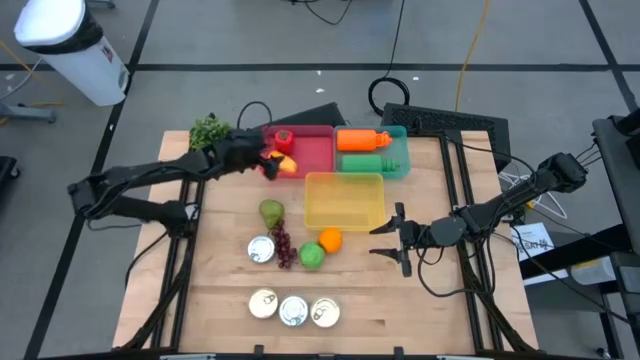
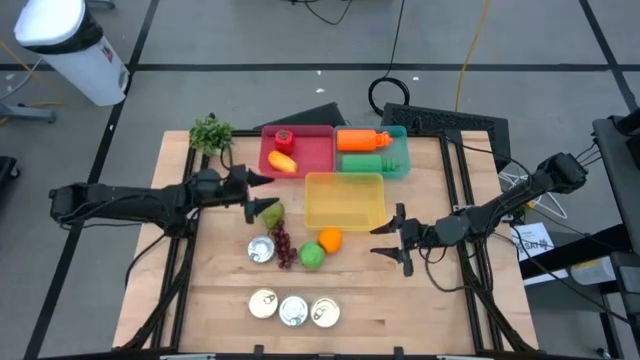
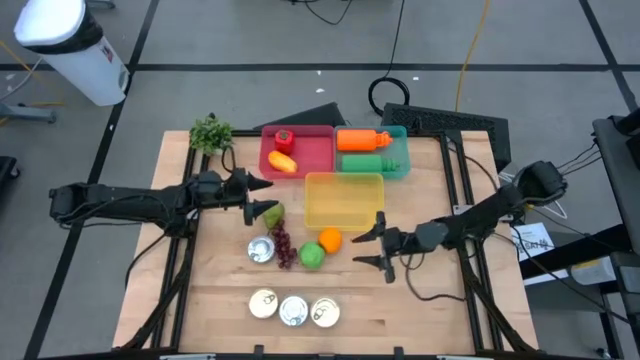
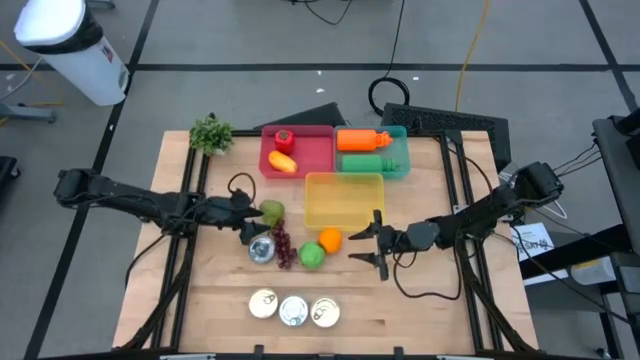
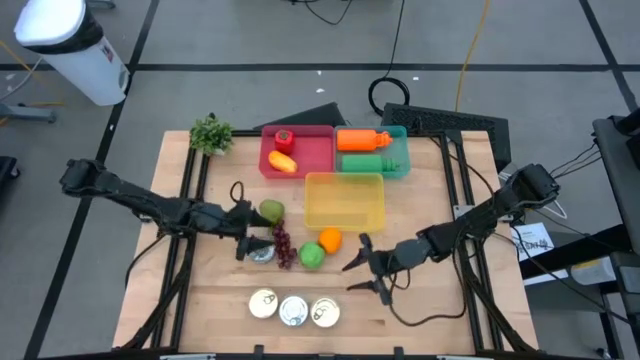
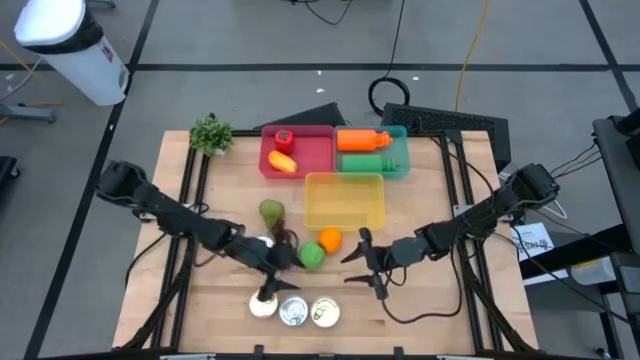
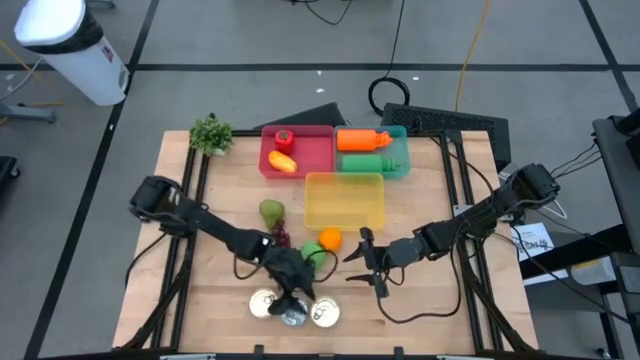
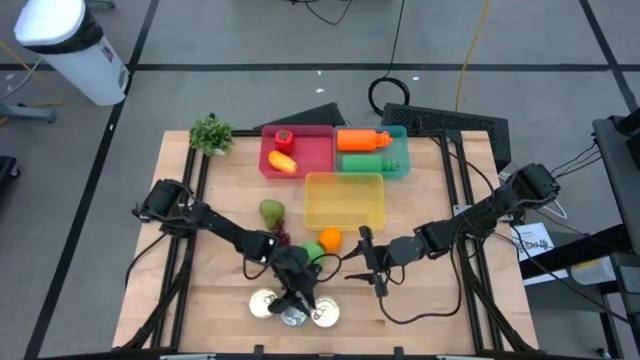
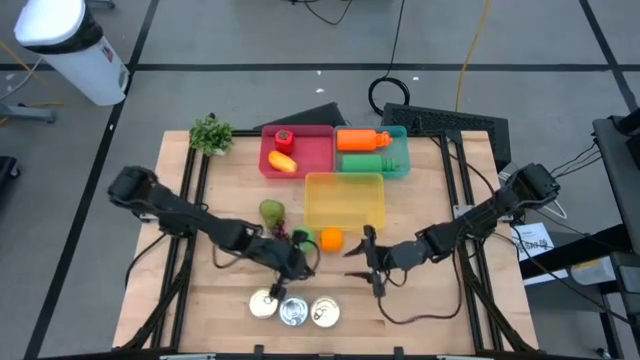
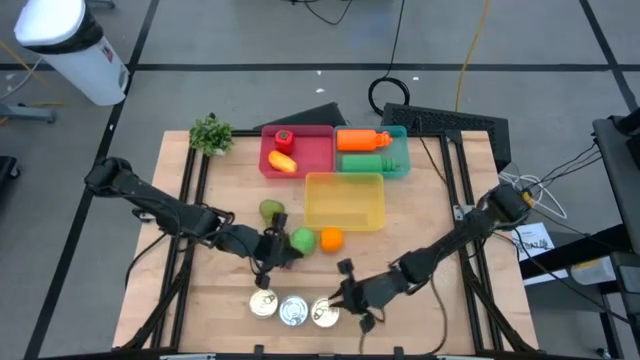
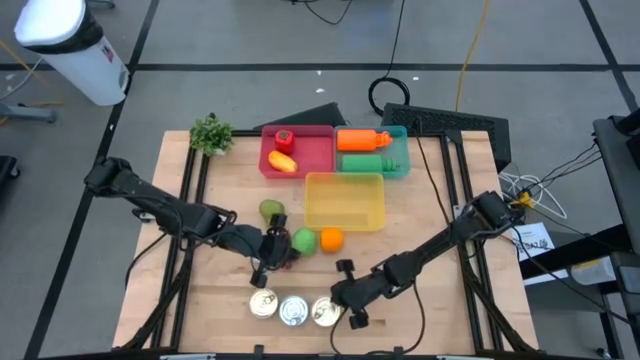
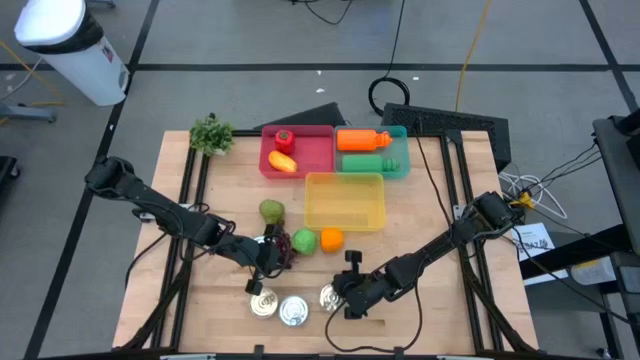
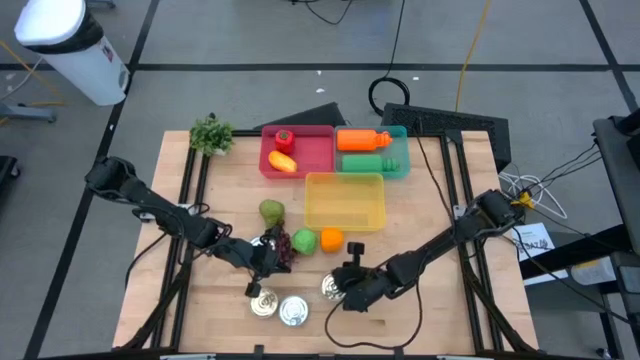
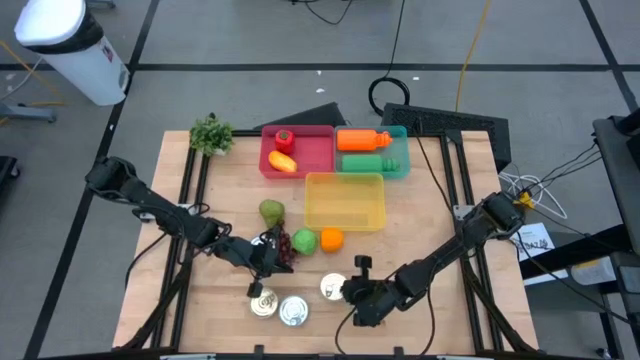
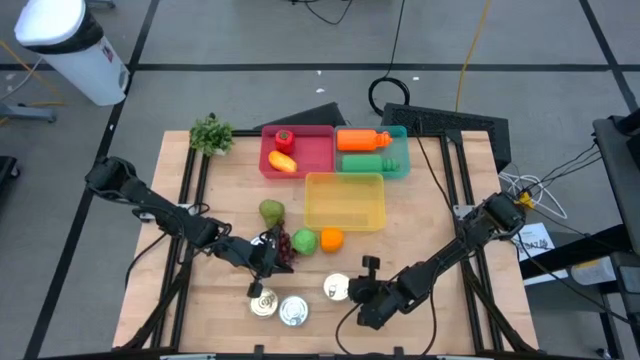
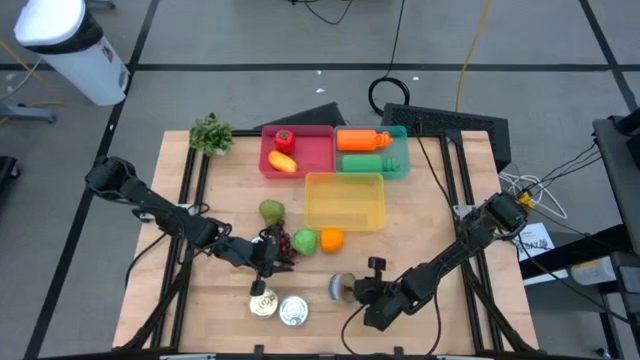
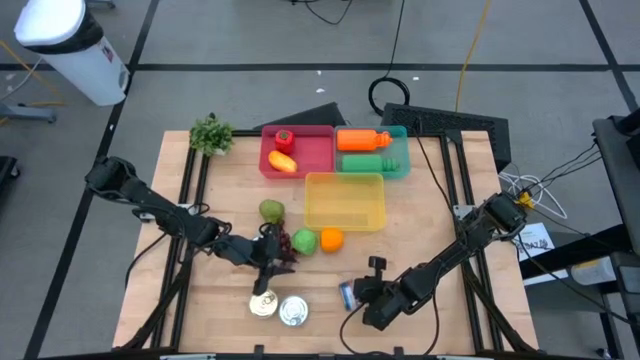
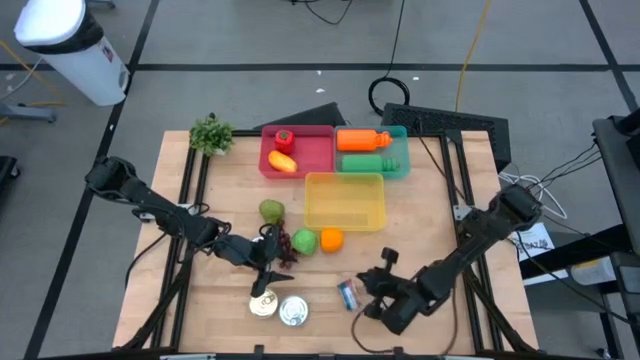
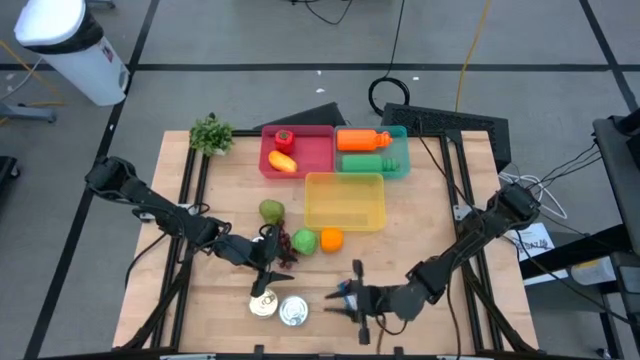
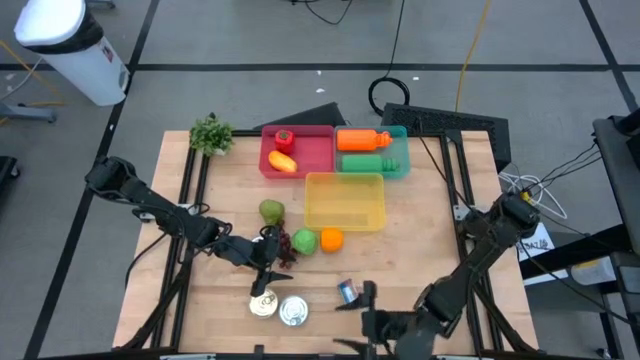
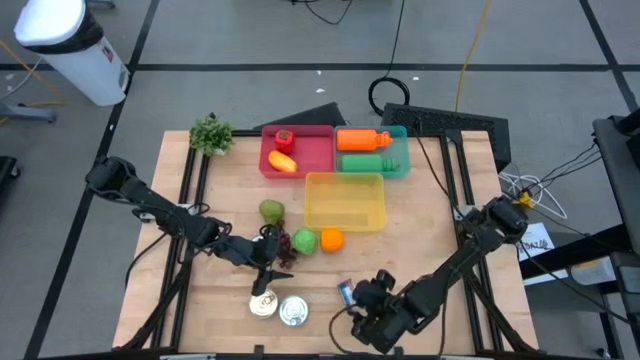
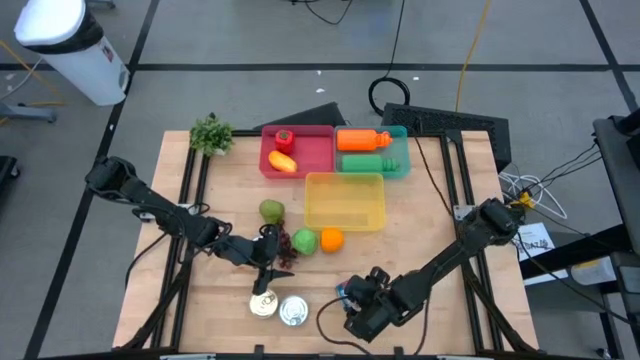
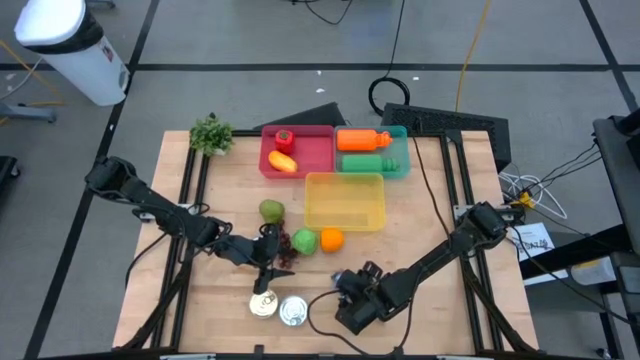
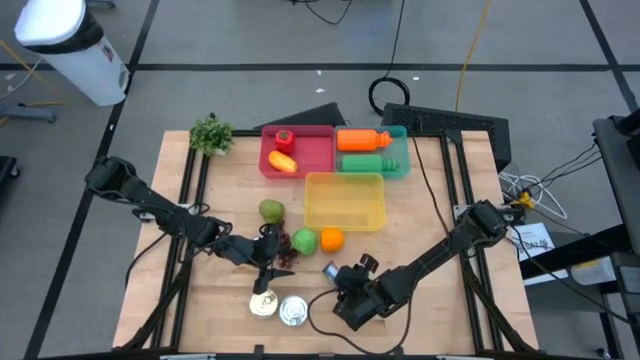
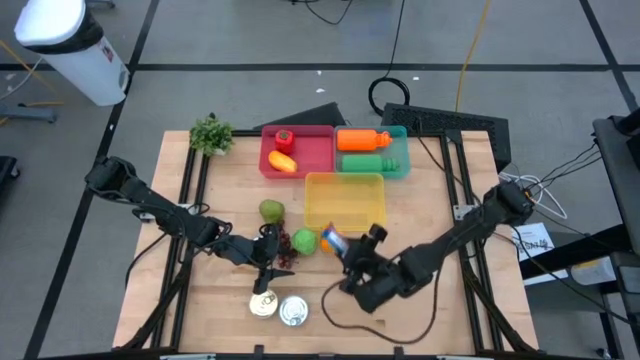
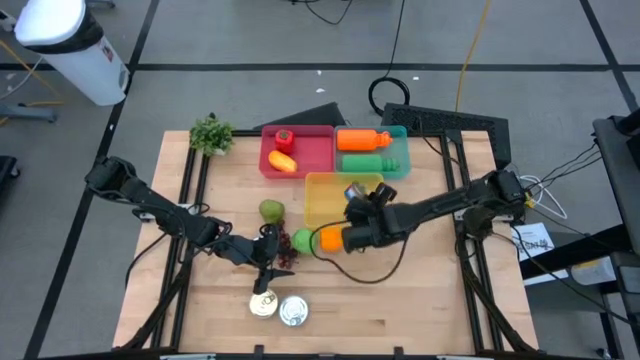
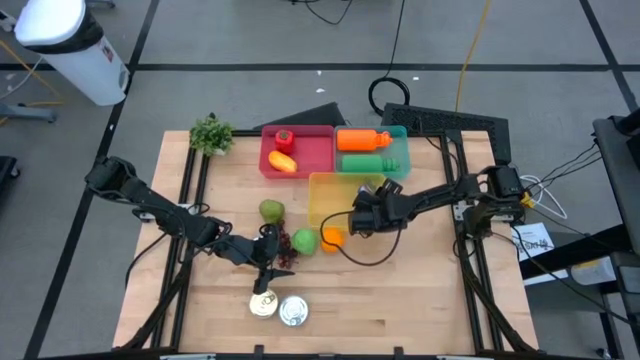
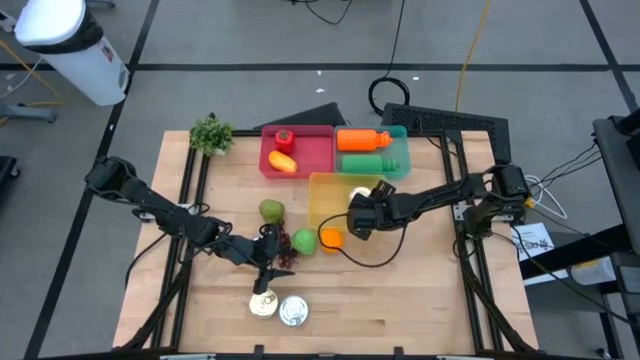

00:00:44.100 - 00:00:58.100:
Task: Pick & Place Food Item
Put the right blue tuna can into the yellow bin

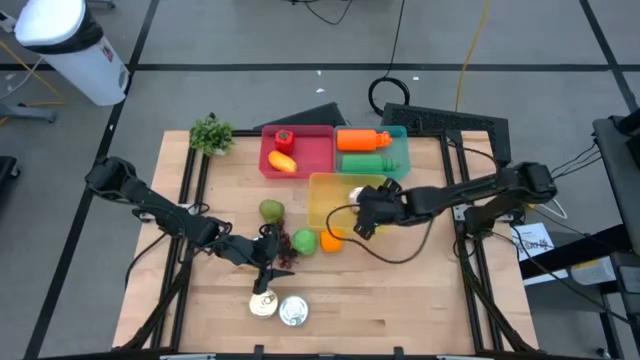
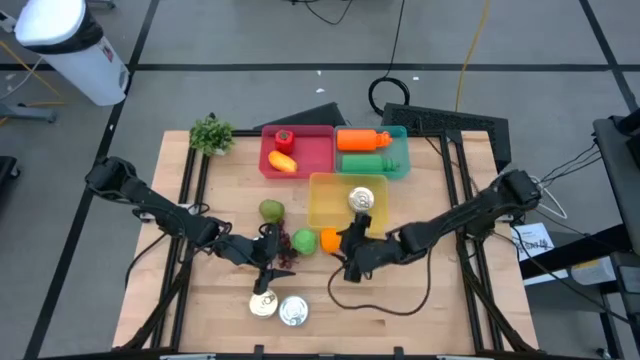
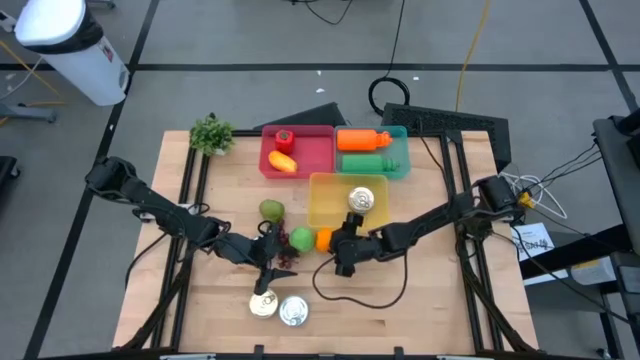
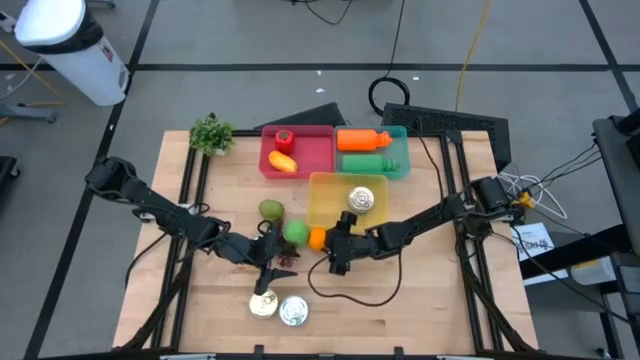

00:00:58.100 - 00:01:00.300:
Put the orange into the red bin

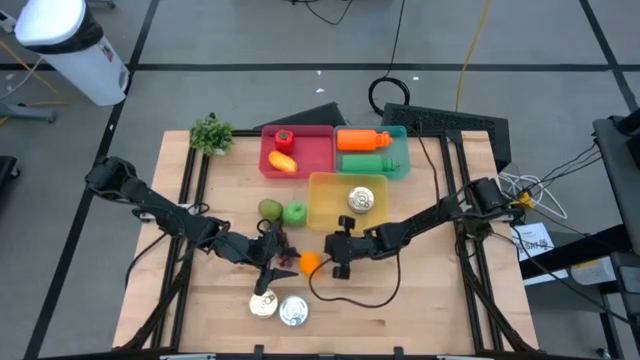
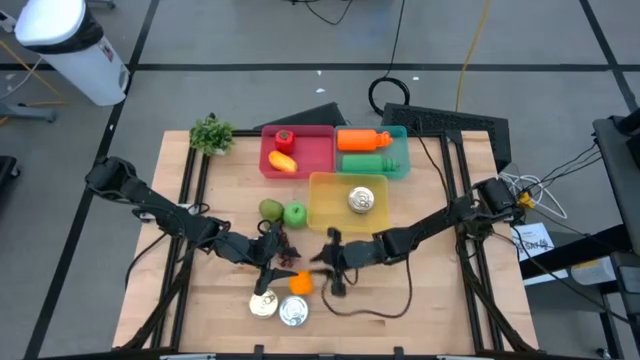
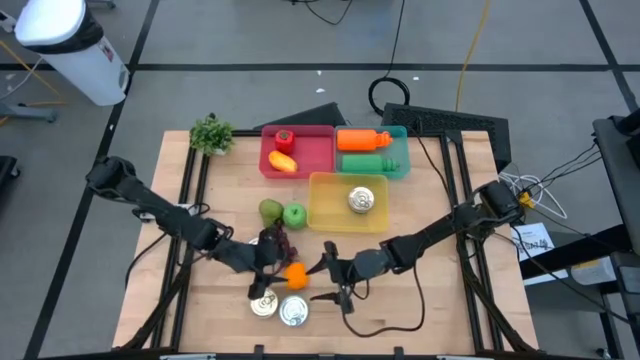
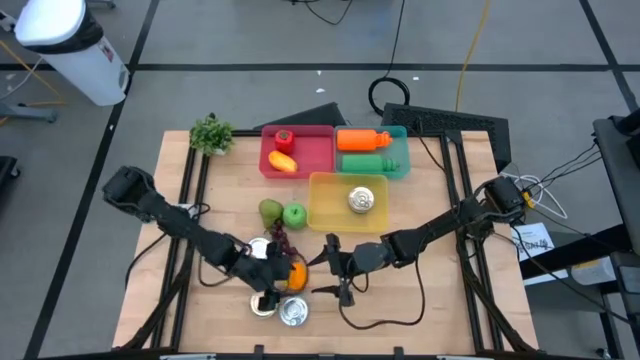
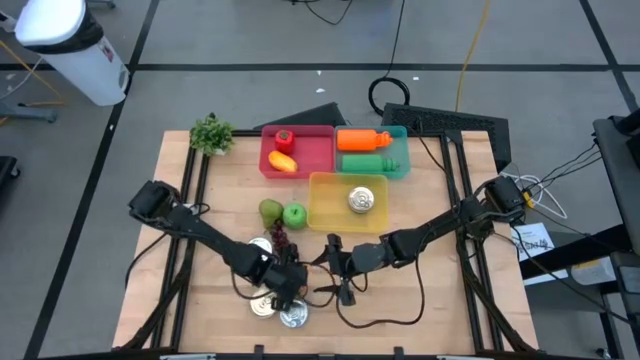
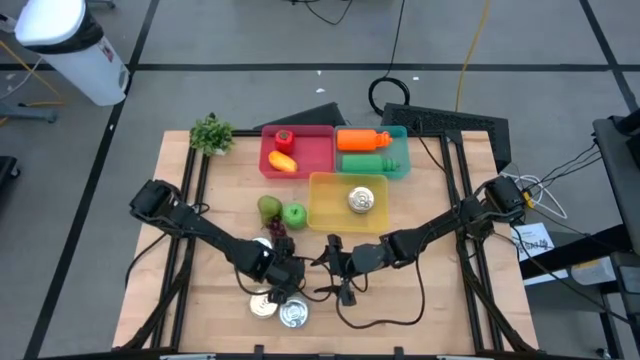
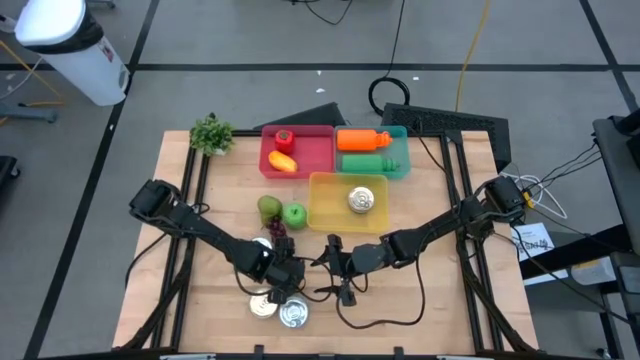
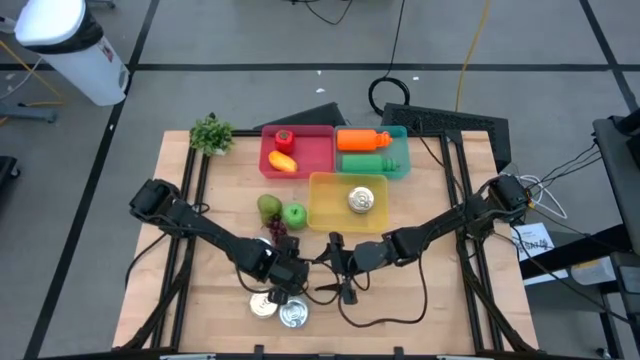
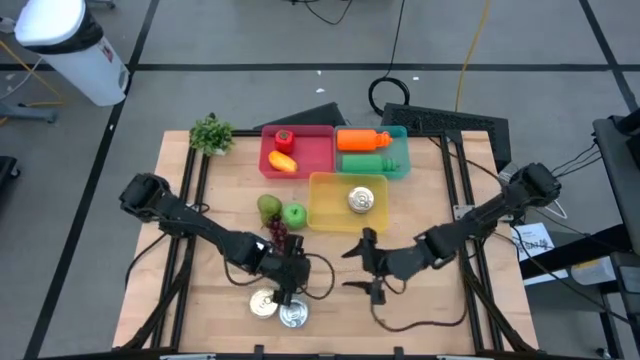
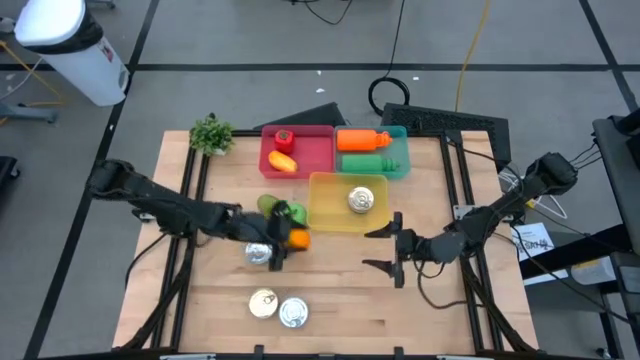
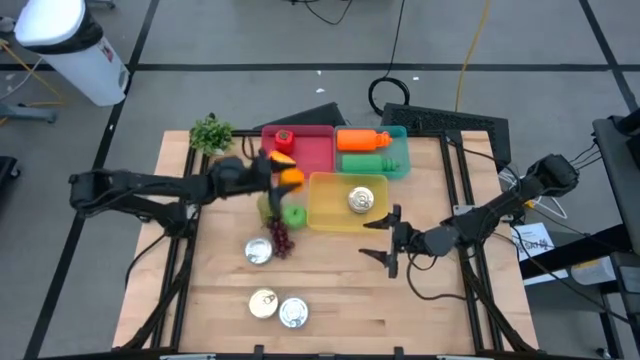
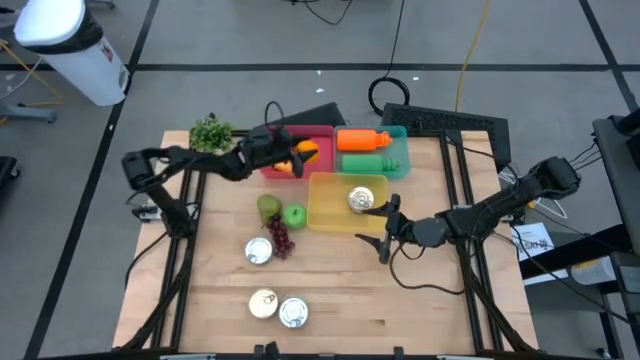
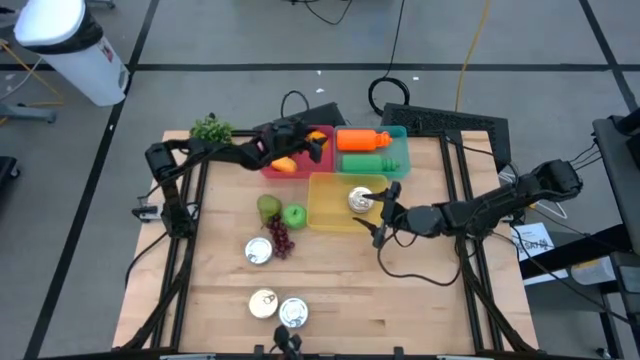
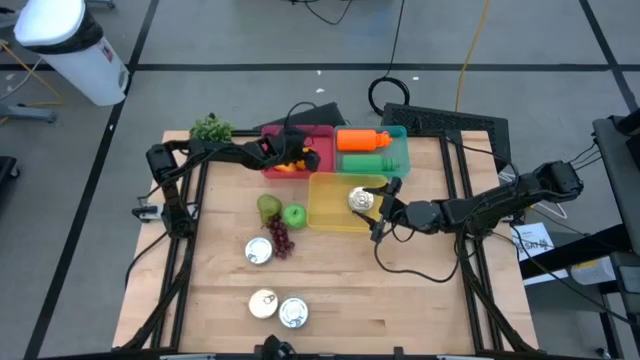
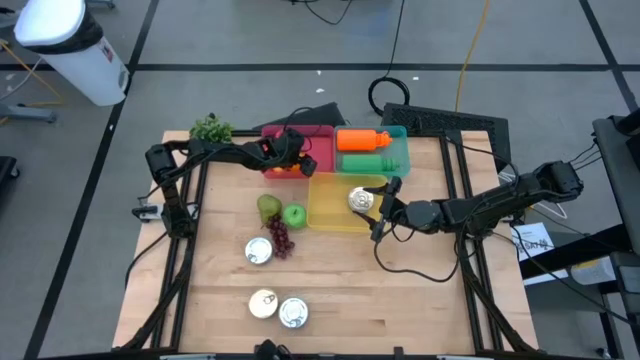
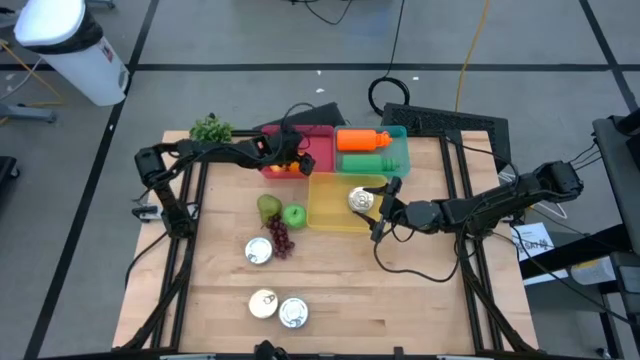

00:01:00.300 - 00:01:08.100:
Put the orange into the red bin
